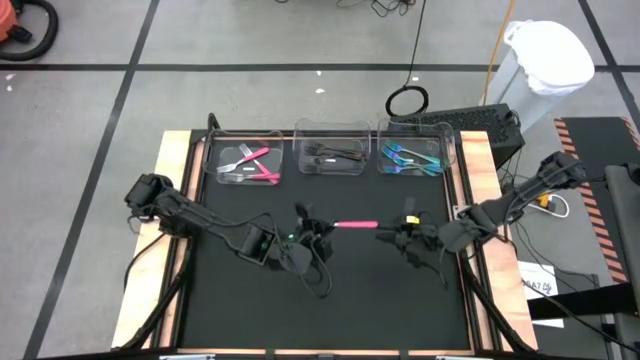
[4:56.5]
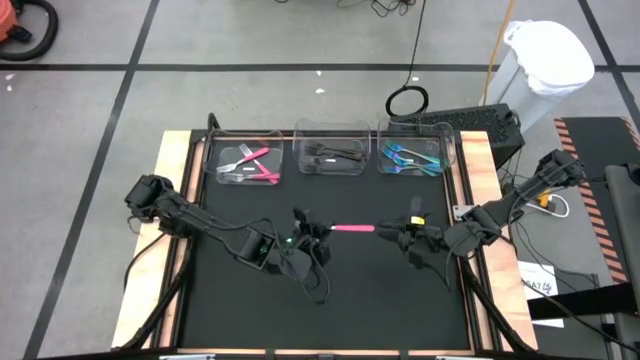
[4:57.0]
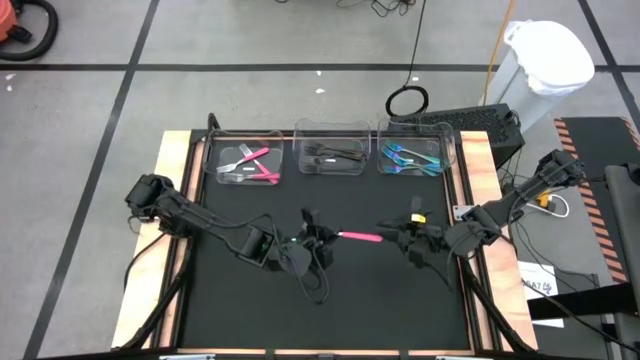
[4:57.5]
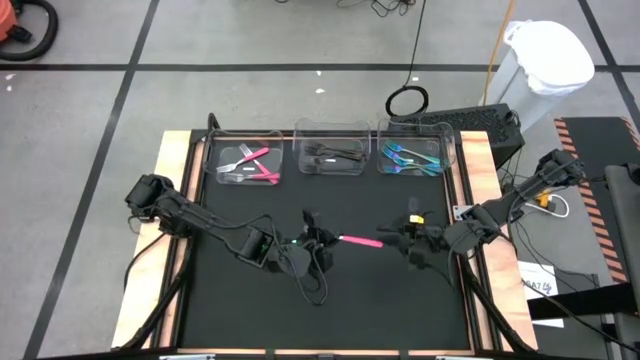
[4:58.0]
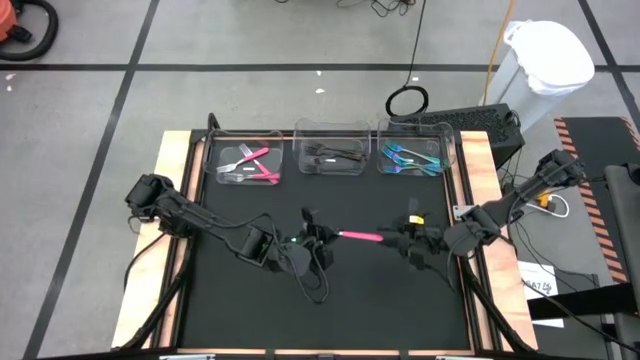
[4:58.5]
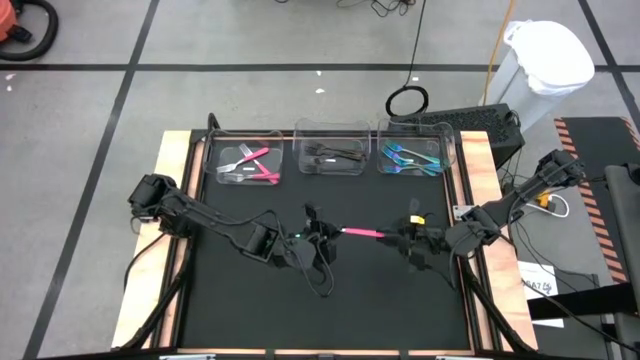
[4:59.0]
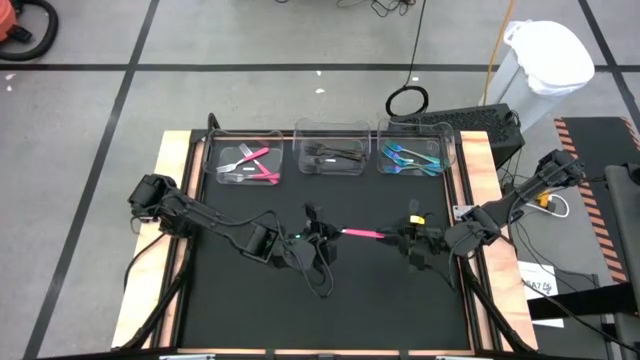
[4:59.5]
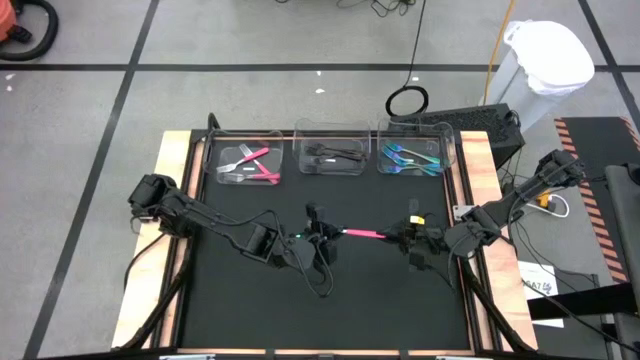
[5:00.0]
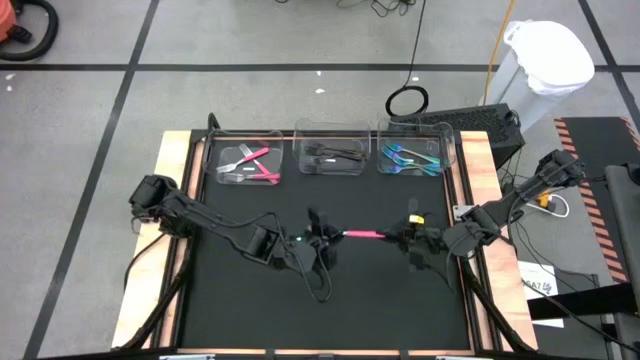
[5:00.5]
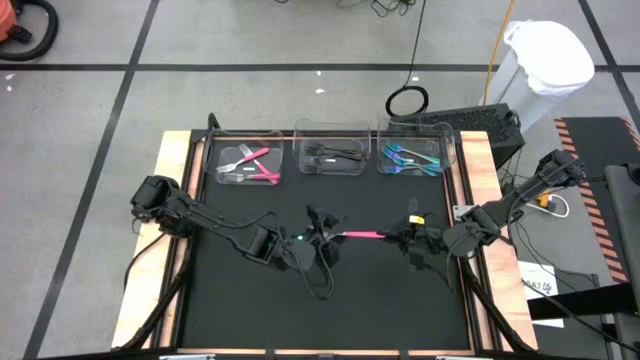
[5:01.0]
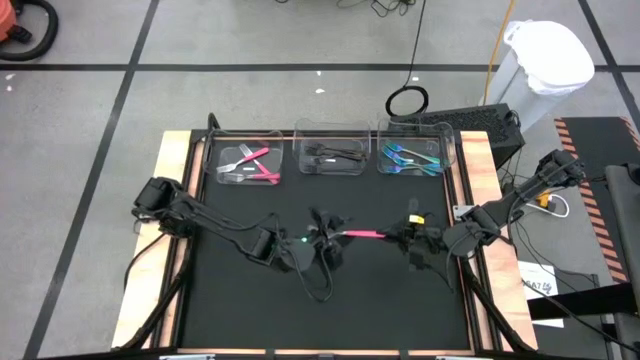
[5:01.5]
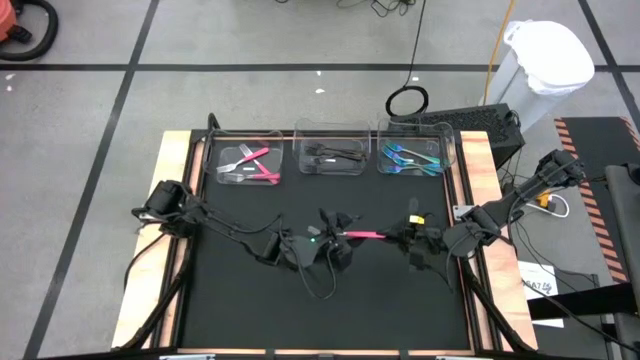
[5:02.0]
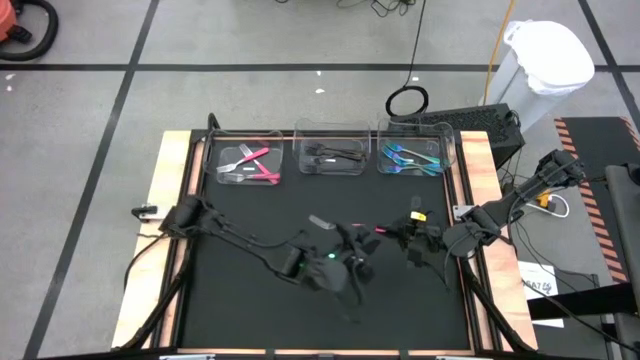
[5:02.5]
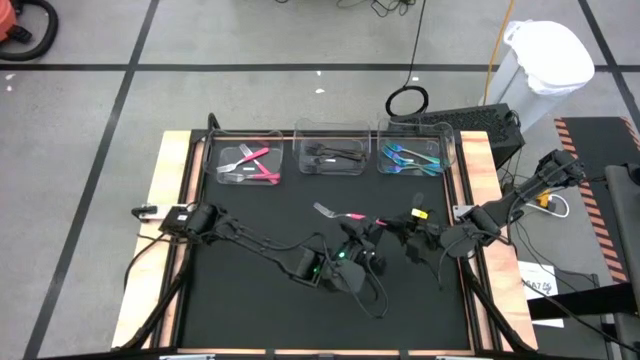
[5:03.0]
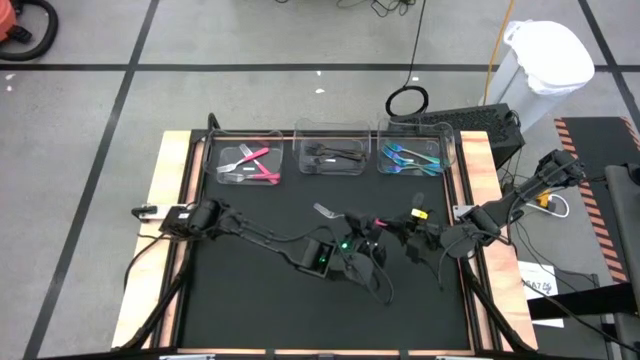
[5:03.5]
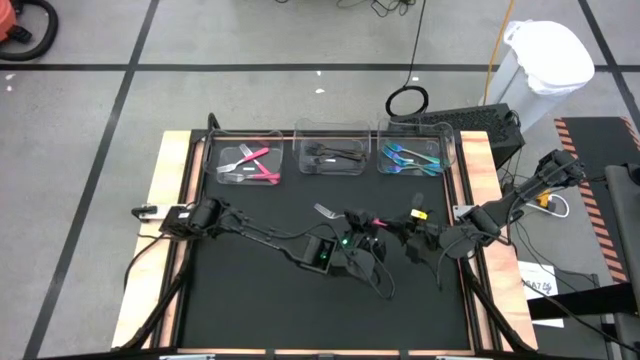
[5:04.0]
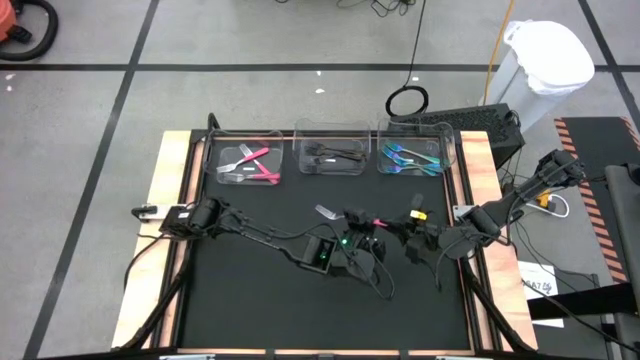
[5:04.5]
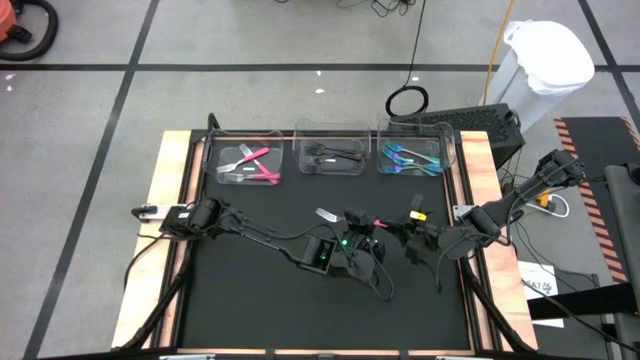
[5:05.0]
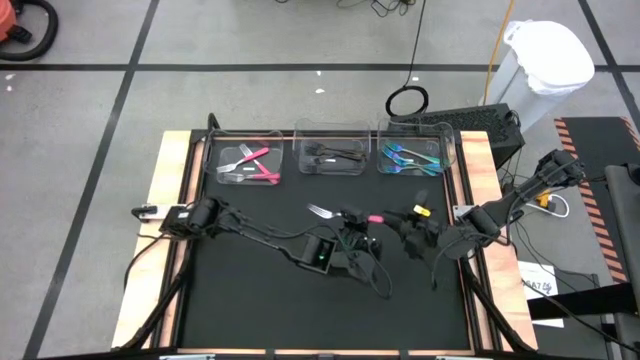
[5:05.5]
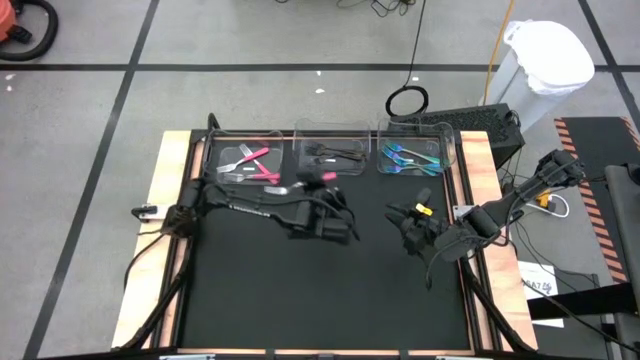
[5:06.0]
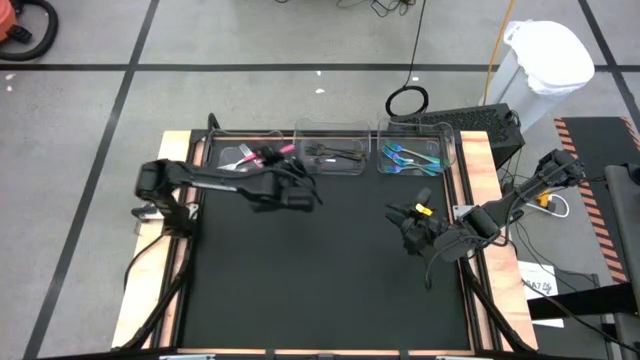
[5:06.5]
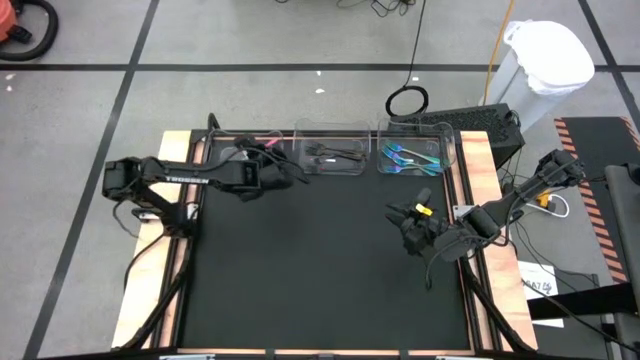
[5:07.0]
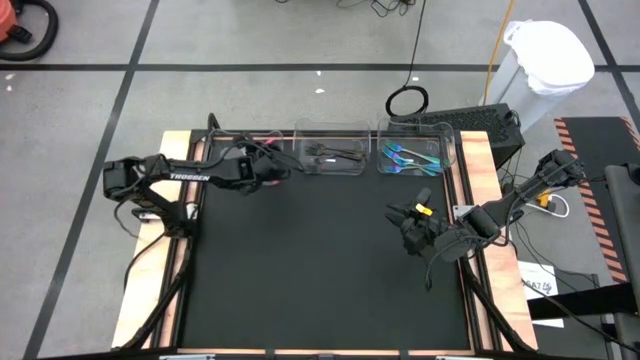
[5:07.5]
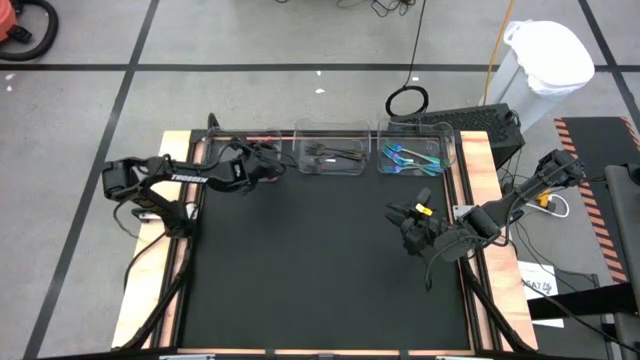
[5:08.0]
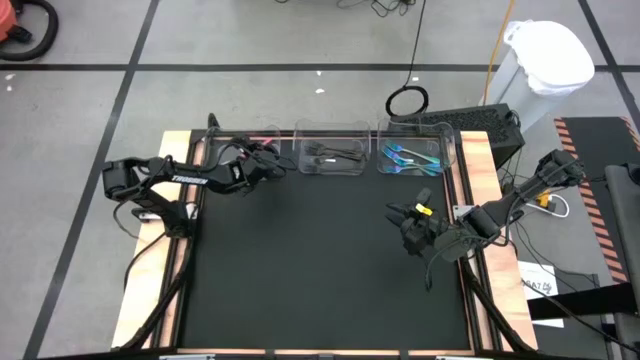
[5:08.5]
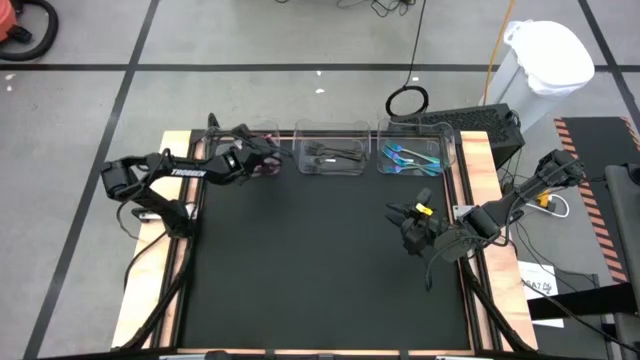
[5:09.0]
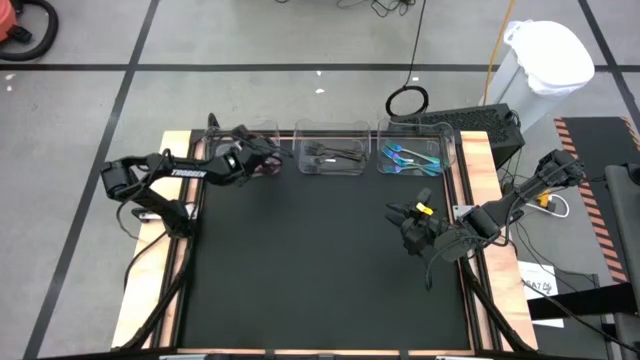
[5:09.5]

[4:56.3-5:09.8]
Task: Sort silverware by color (type)
Put the pink fork into the transparent bin

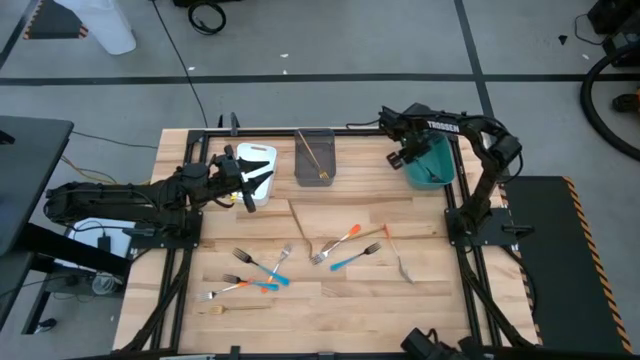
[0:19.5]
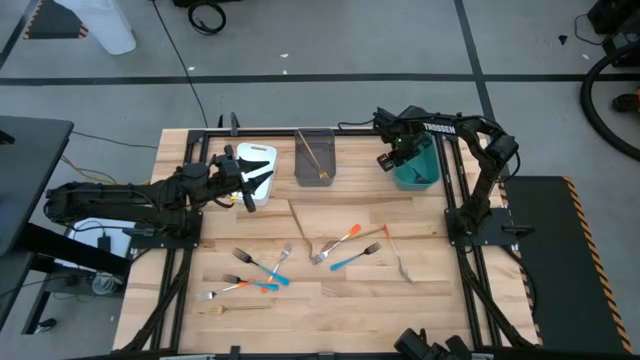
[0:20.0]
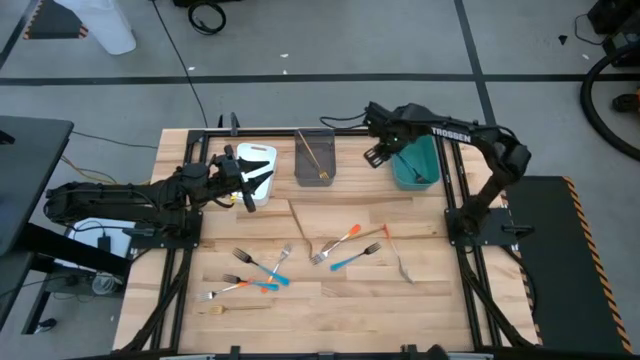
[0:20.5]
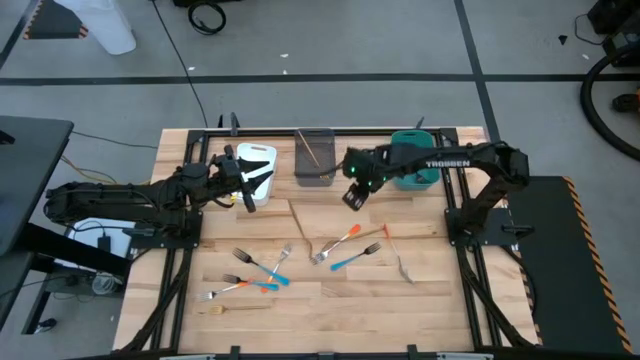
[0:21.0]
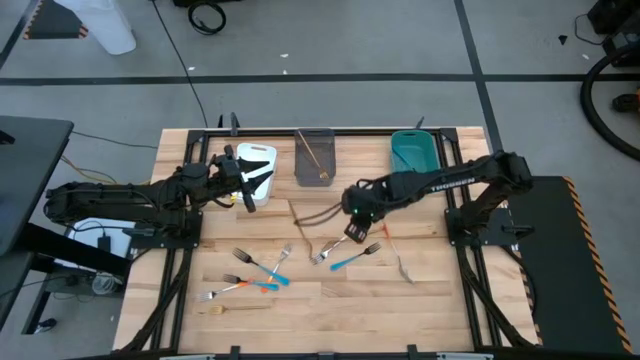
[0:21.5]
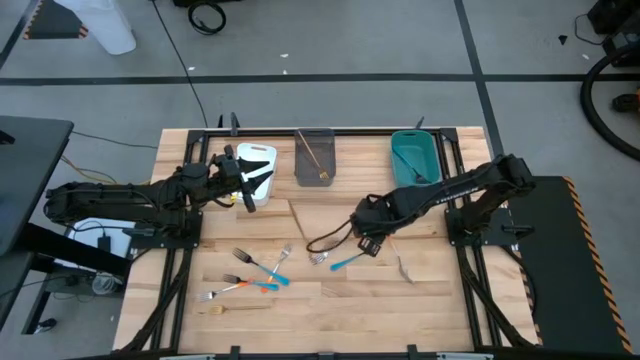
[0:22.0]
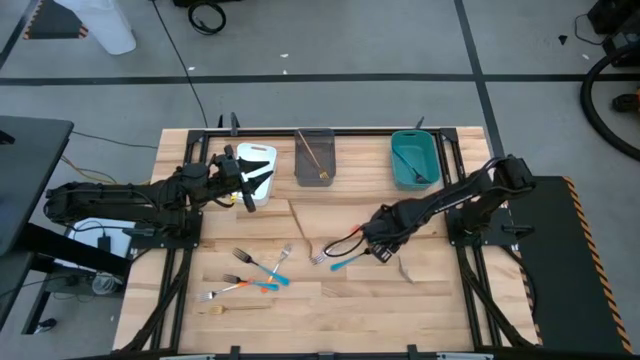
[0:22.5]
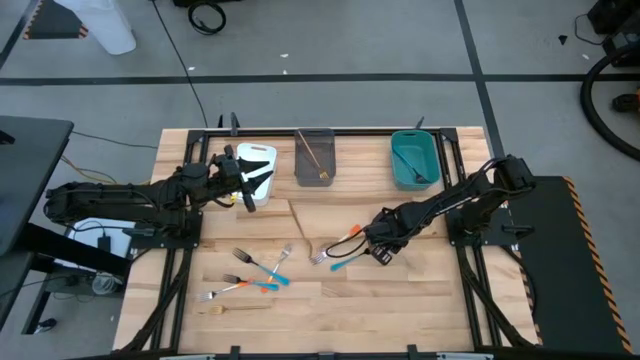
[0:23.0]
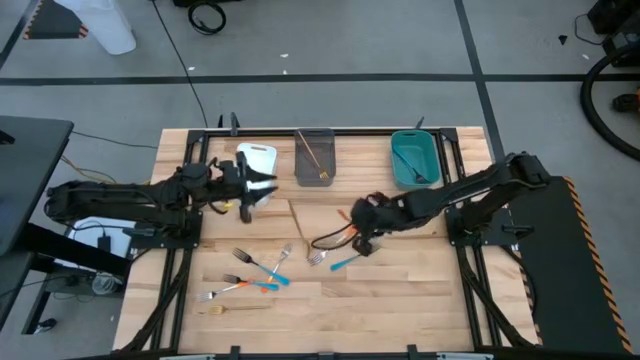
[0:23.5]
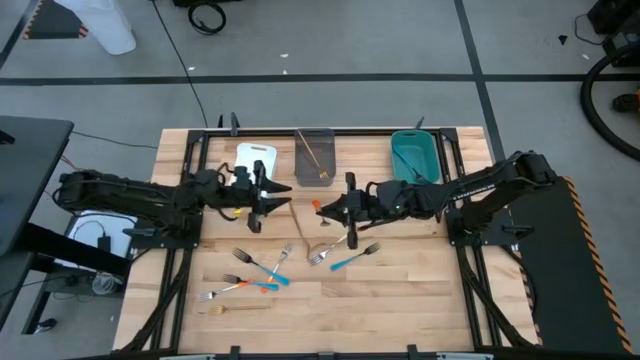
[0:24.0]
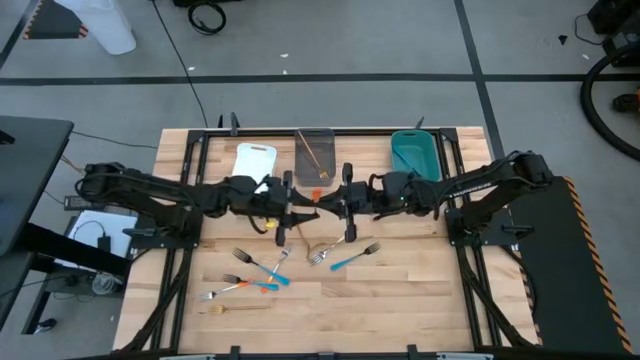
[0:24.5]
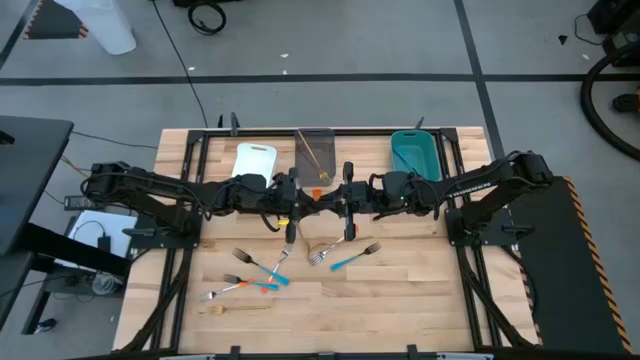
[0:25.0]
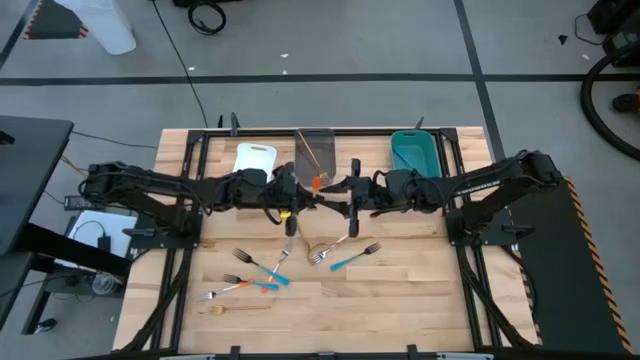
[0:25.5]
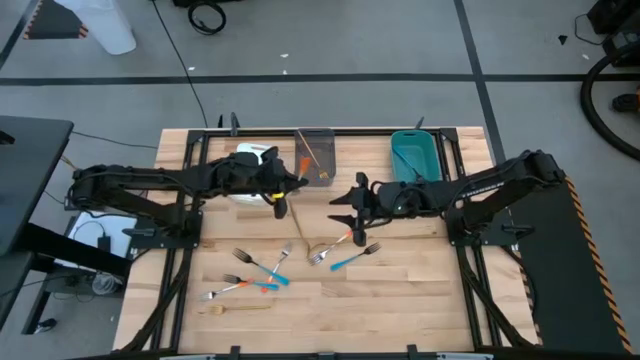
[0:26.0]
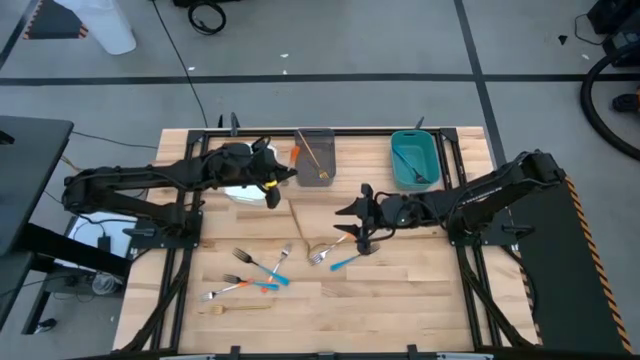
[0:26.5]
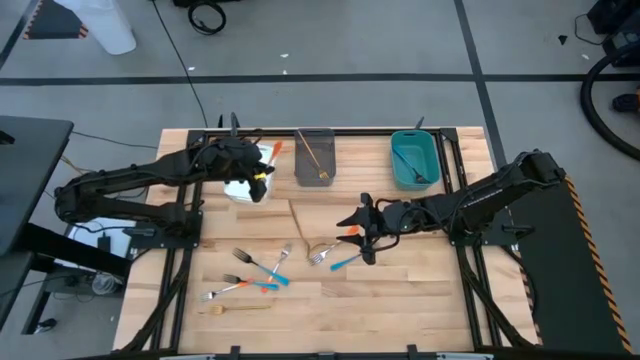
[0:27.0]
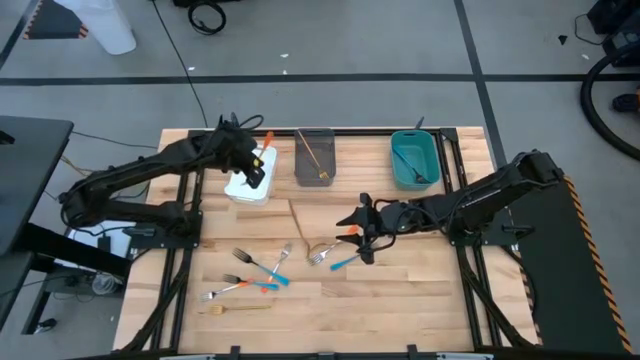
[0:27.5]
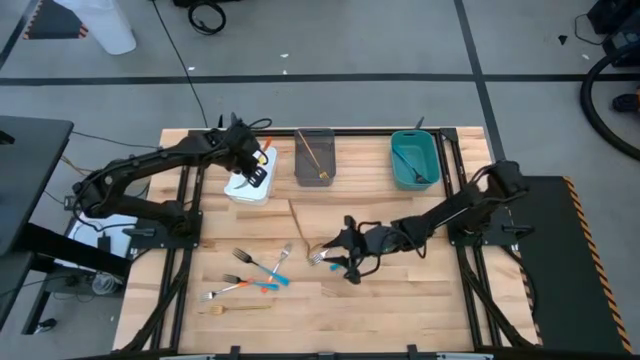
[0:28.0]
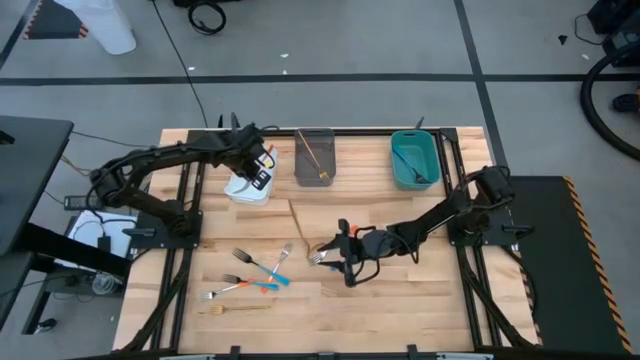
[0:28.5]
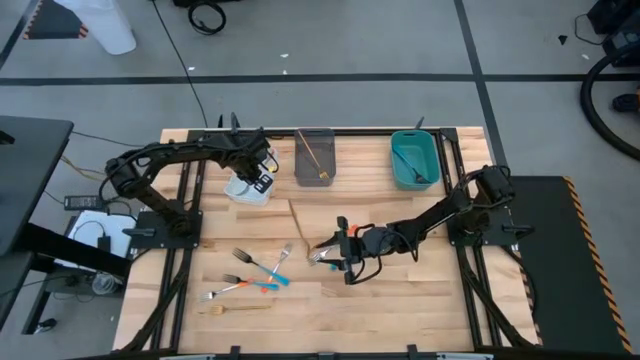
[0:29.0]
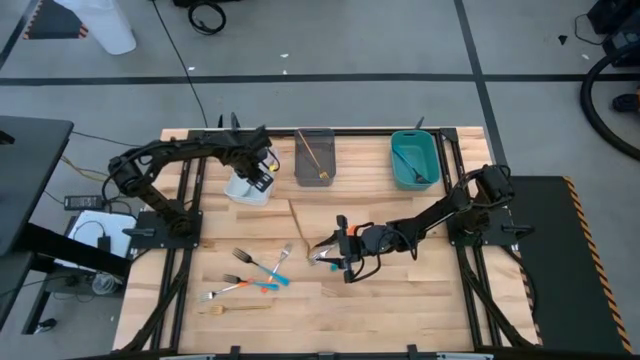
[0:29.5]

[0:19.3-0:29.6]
Task: Sort silverware by color (type)
Put the orange fork into the white bin
